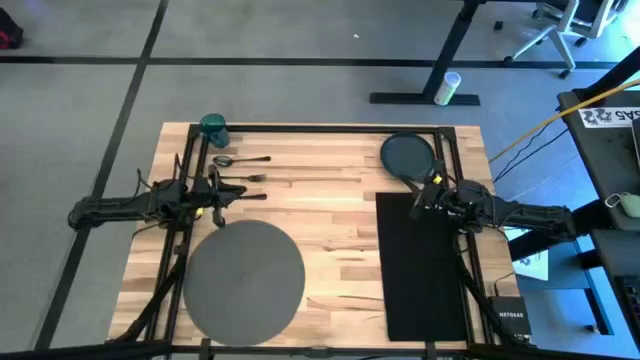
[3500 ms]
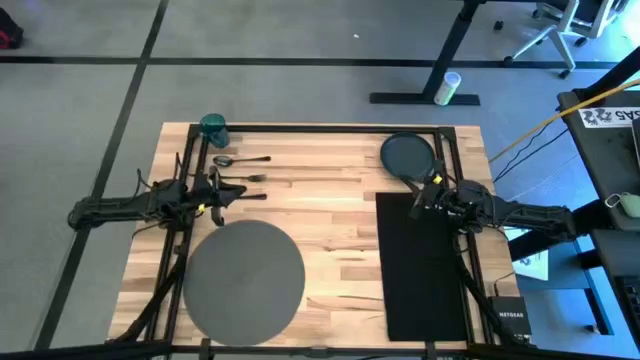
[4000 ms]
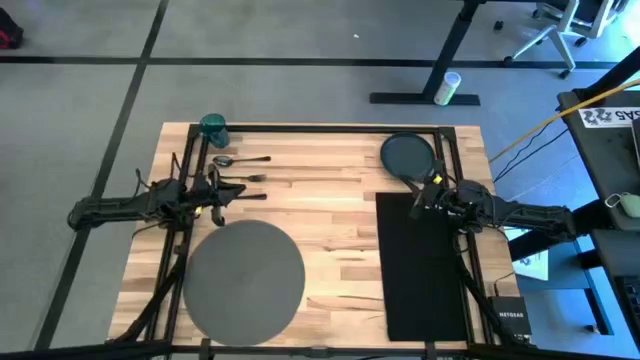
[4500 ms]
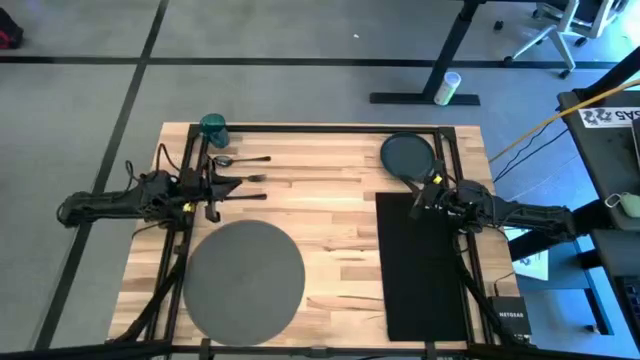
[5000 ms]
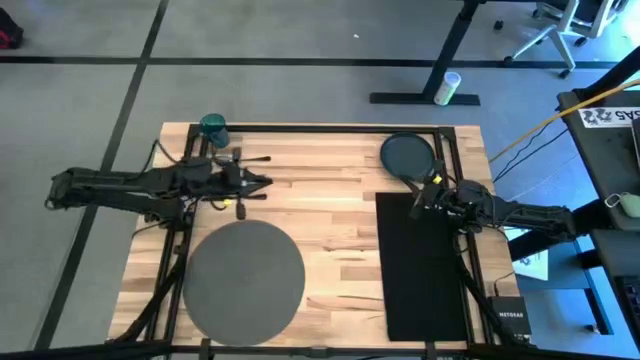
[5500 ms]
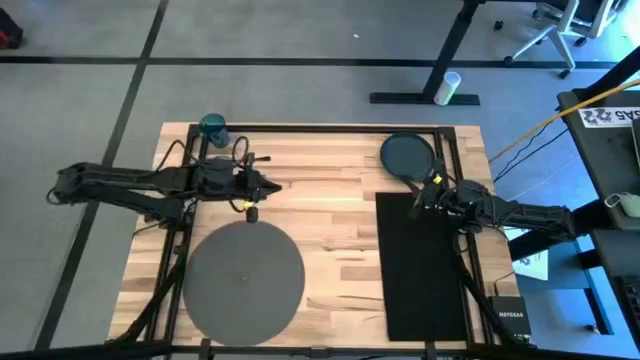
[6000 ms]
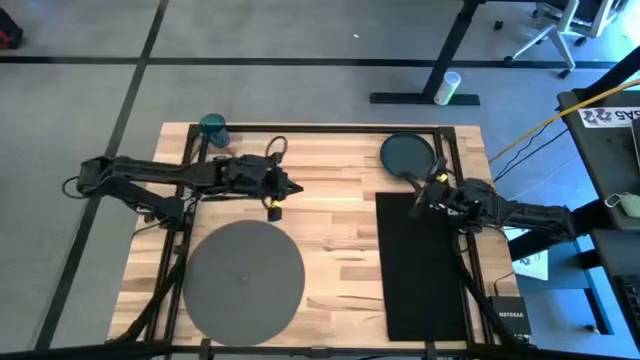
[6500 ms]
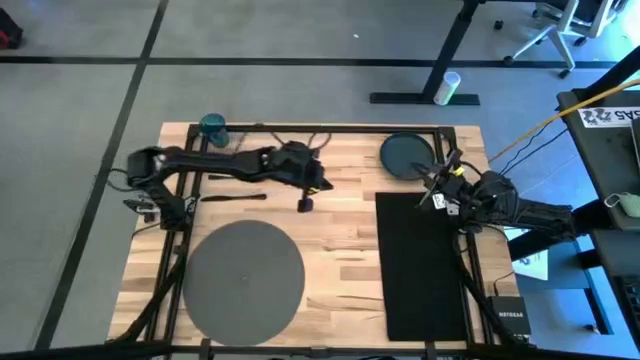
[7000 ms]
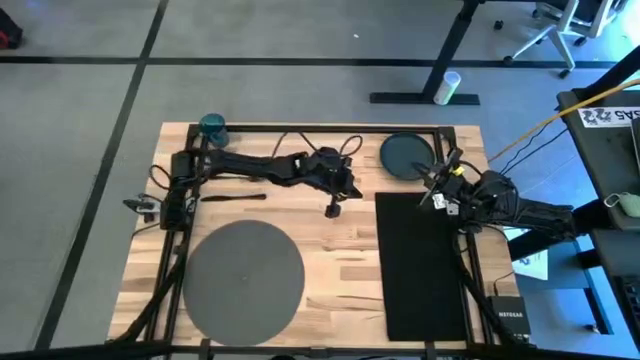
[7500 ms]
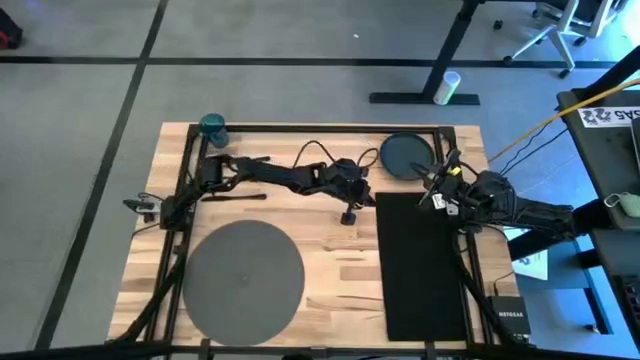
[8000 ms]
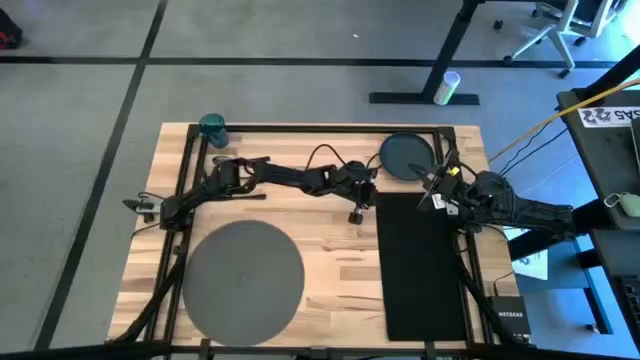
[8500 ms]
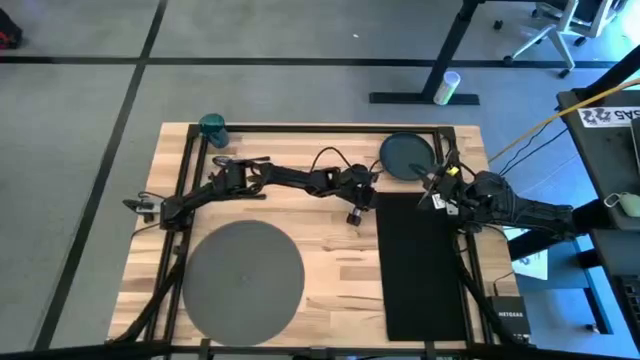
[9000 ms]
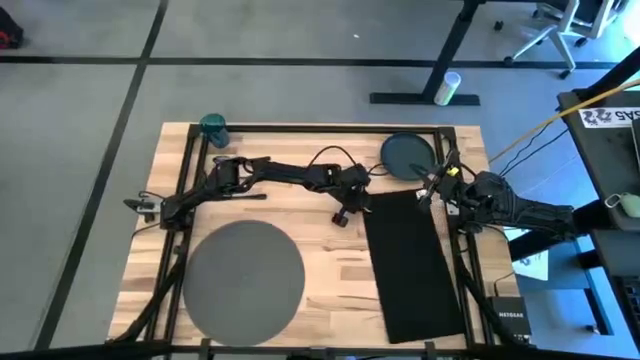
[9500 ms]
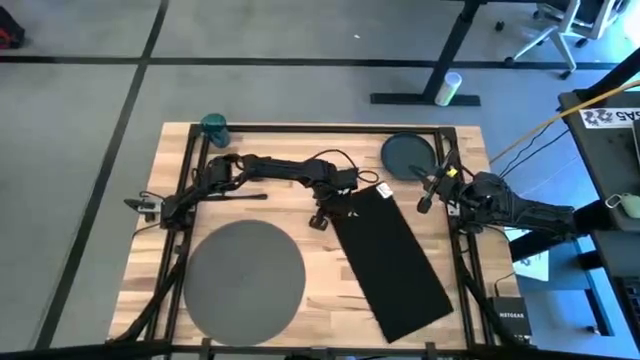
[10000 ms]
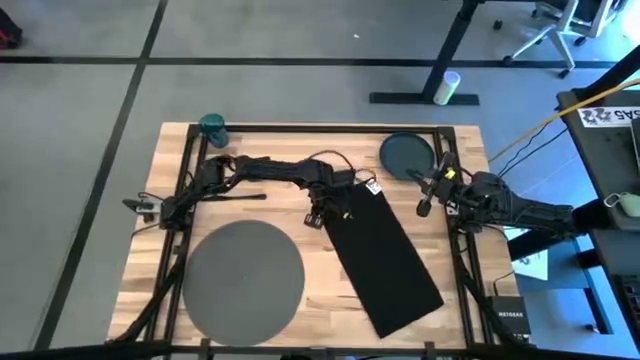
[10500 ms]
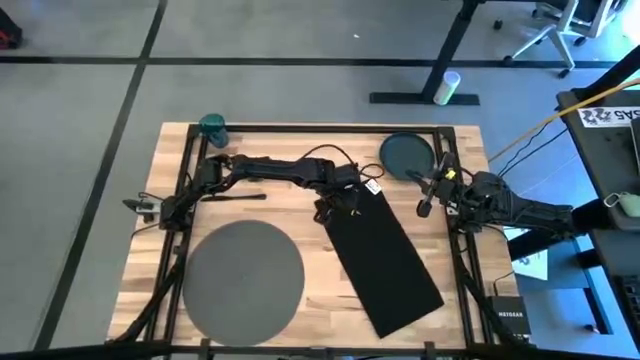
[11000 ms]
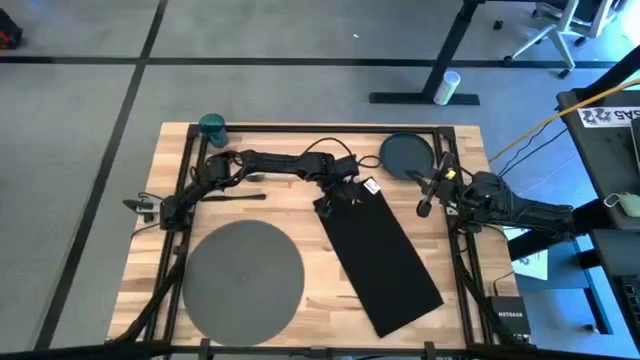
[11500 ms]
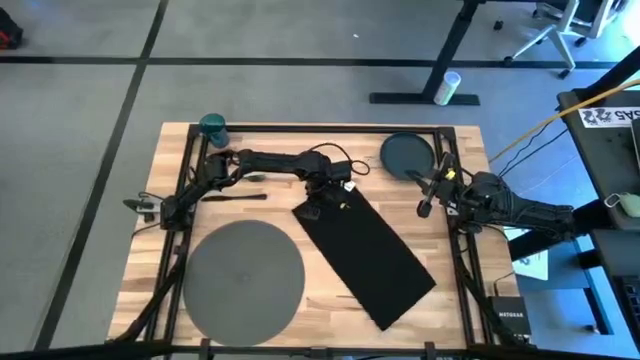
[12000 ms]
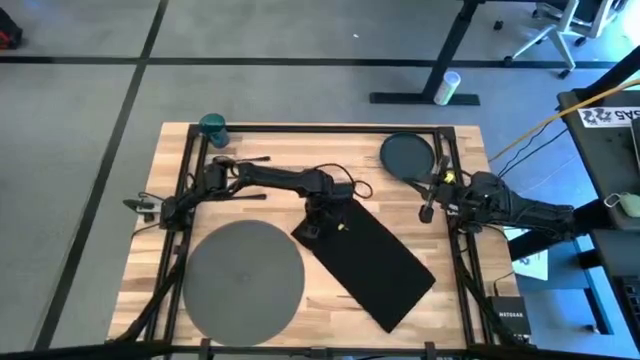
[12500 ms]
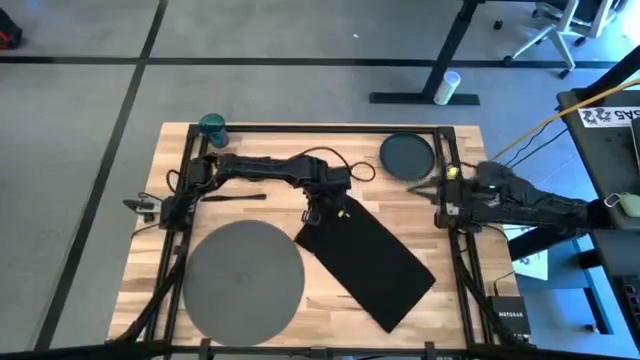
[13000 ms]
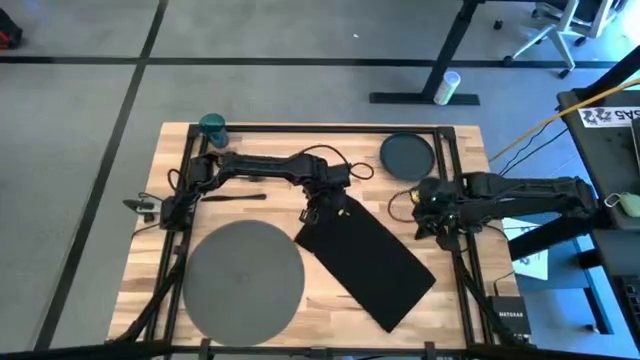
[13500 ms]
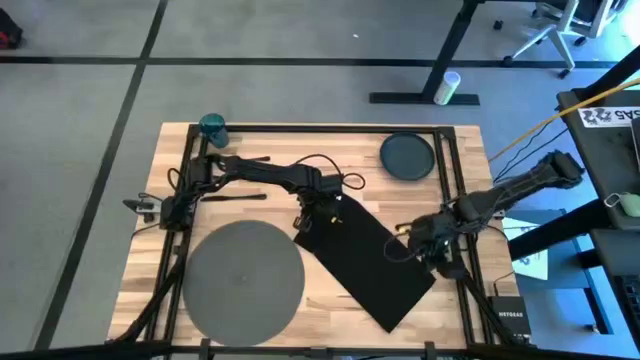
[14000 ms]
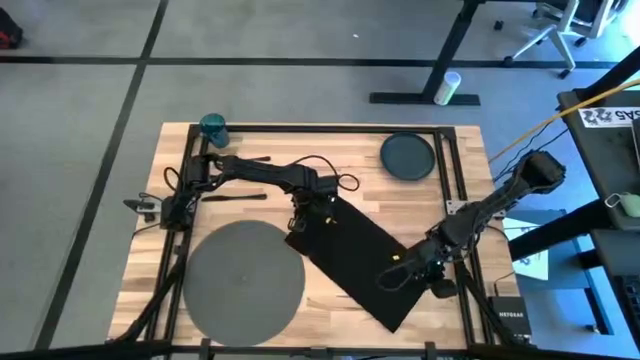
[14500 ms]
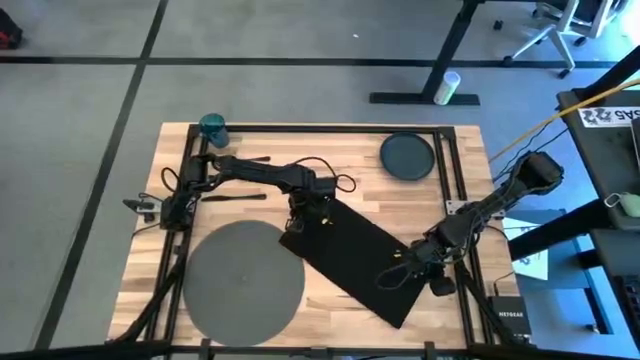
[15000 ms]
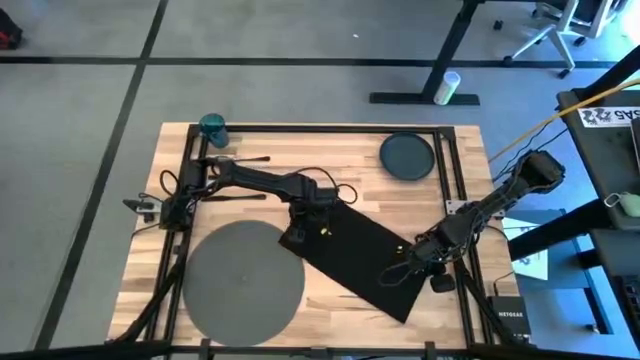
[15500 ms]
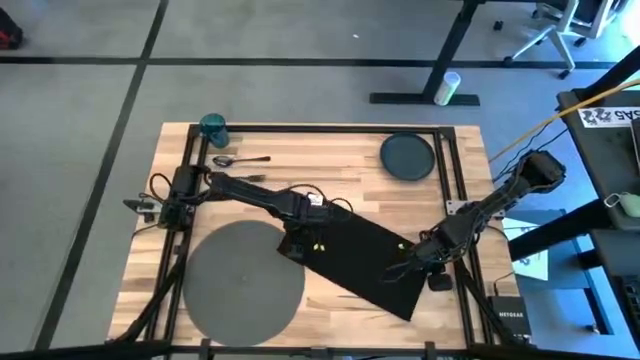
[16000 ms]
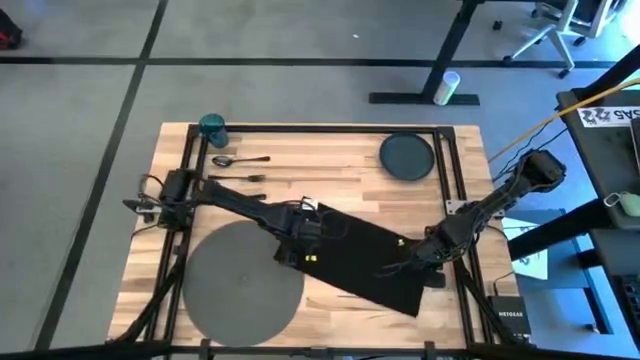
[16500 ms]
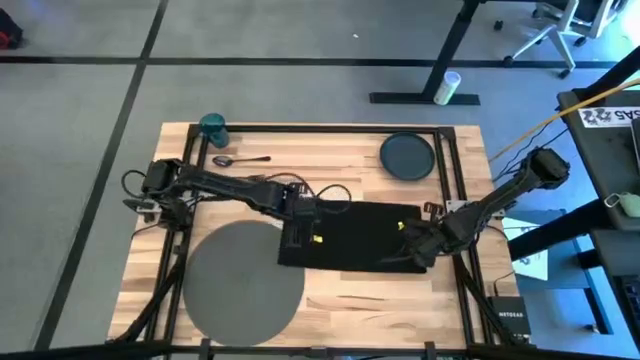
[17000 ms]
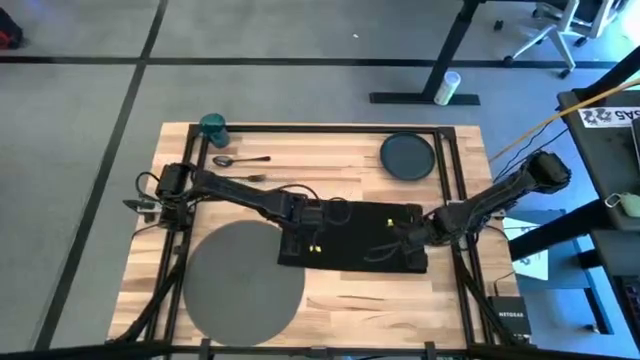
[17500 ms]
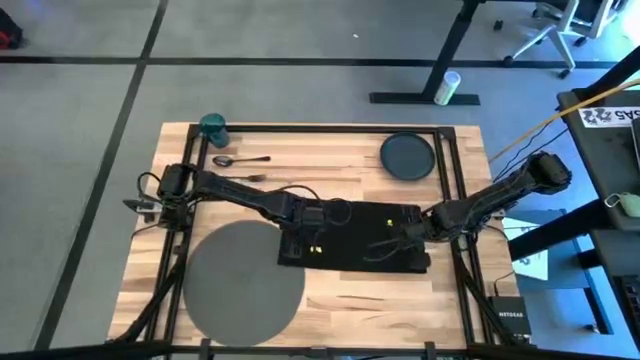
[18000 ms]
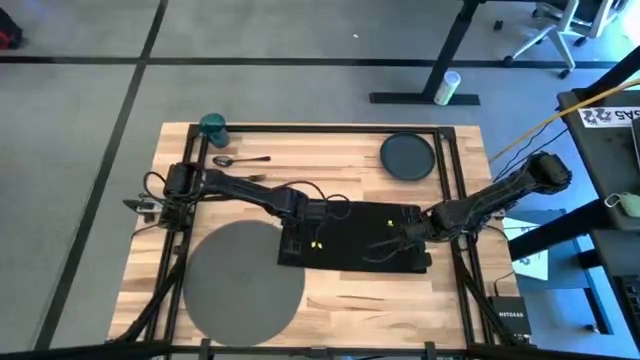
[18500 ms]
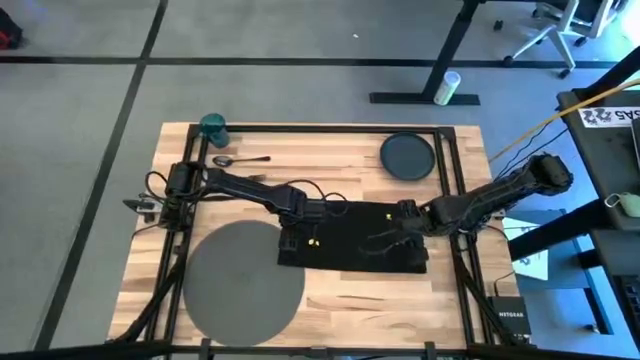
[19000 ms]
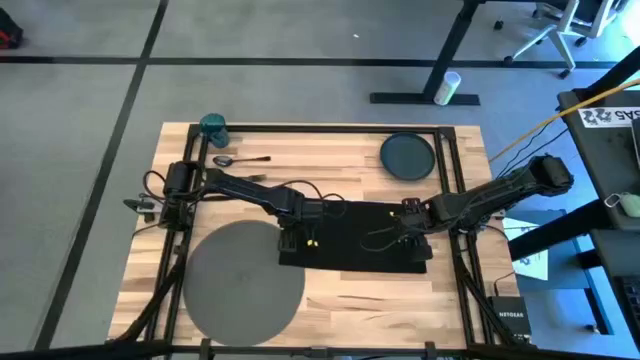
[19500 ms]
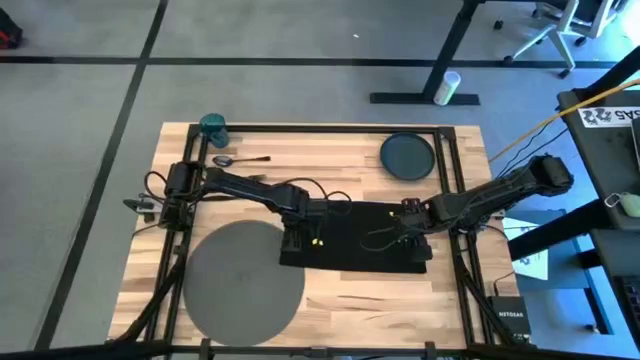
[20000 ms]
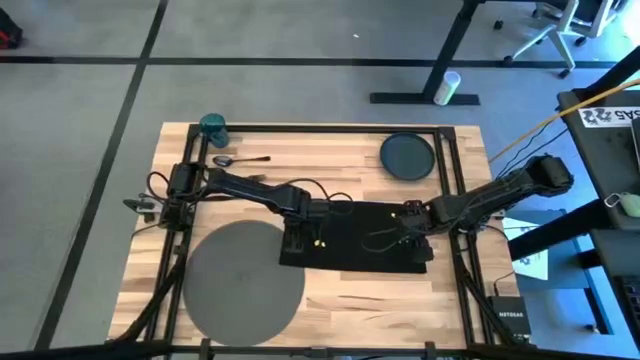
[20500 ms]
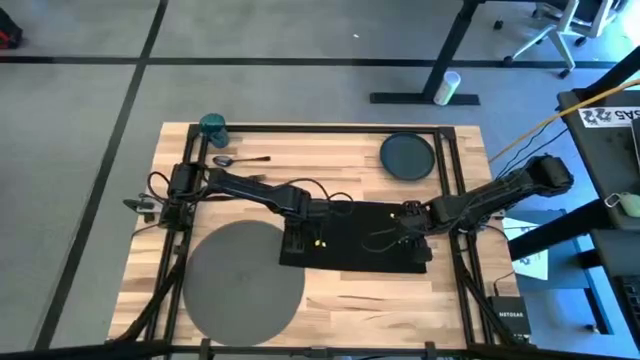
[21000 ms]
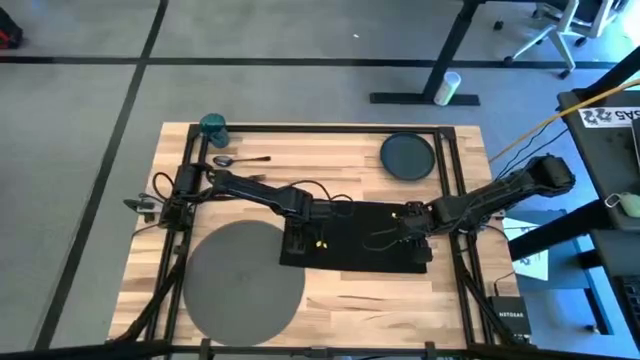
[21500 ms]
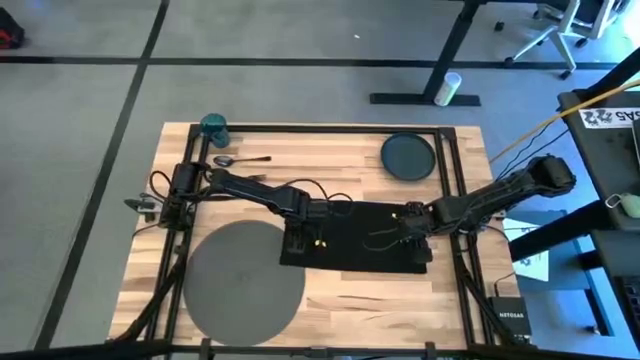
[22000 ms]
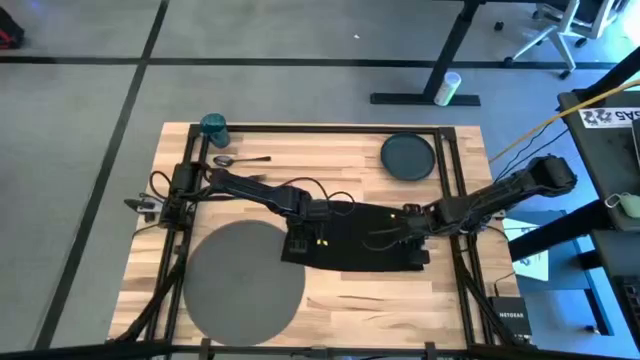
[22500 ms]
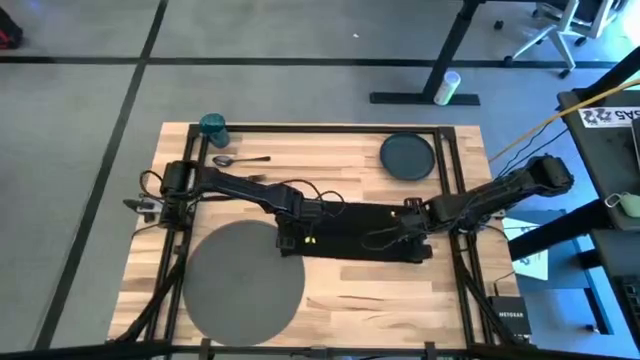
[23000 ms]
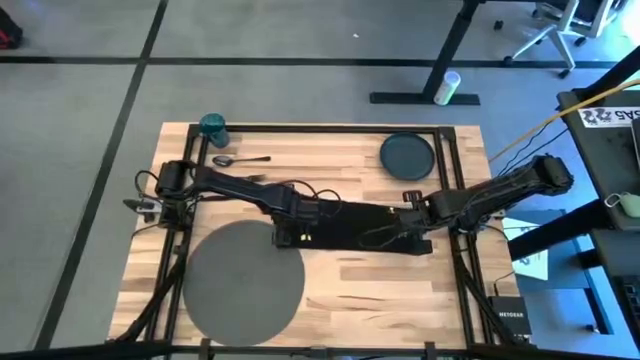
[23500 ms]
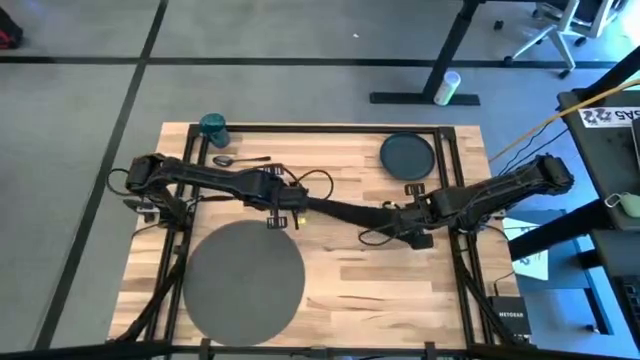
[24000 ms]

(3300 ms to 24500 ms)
Task: Set table place
Fold the black table napkin
